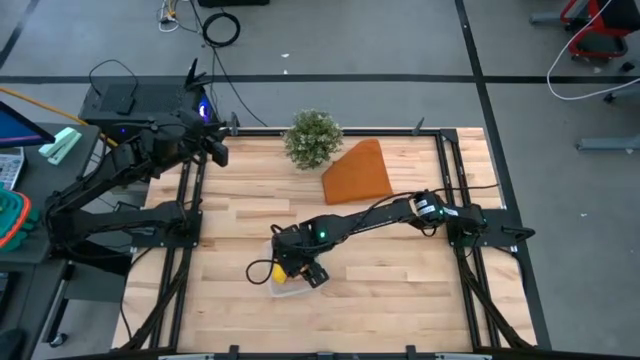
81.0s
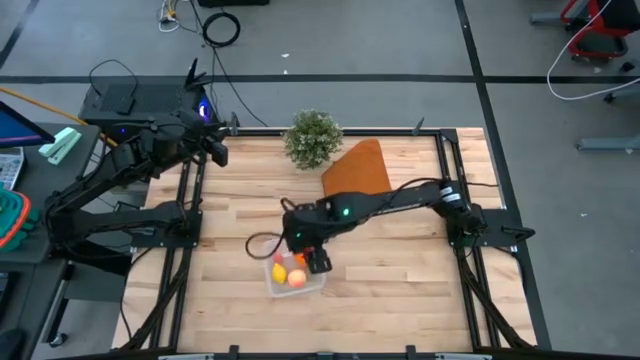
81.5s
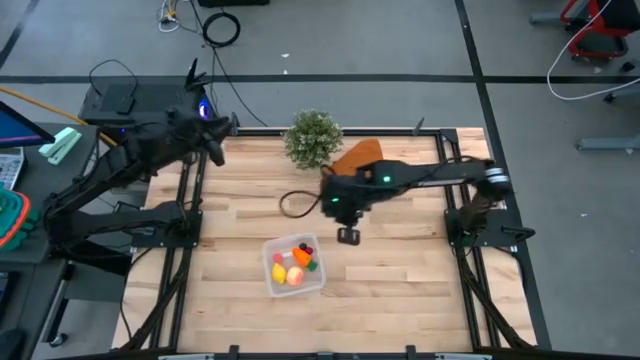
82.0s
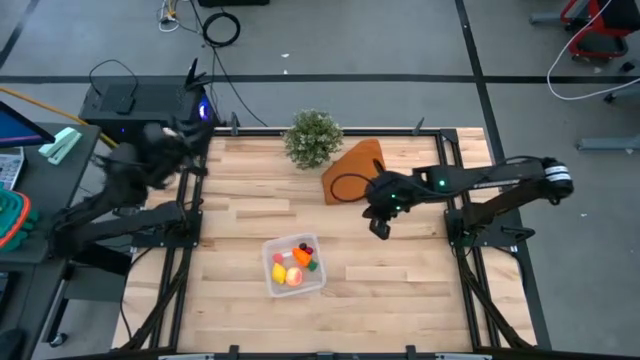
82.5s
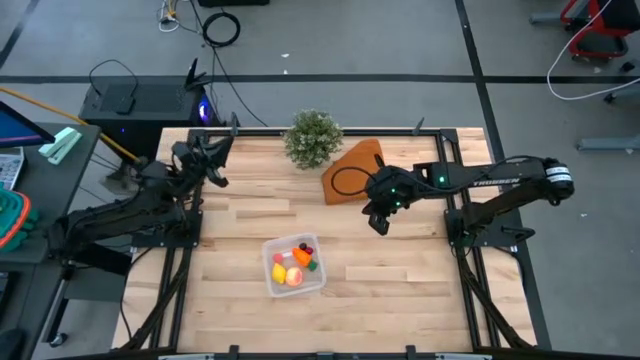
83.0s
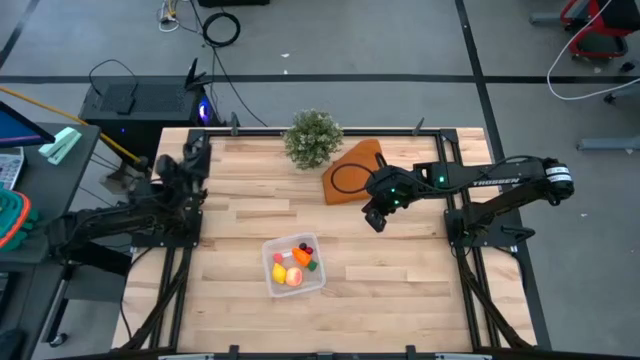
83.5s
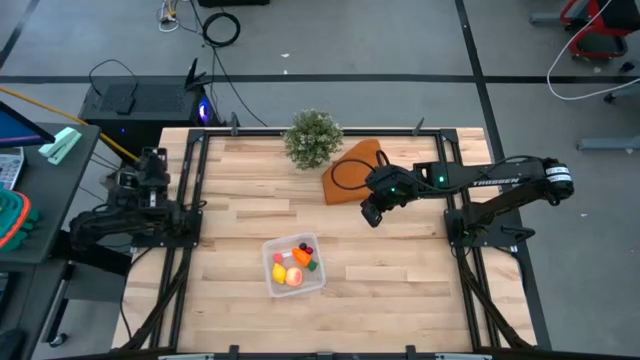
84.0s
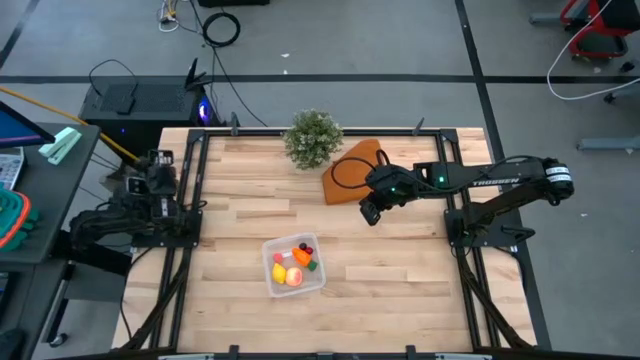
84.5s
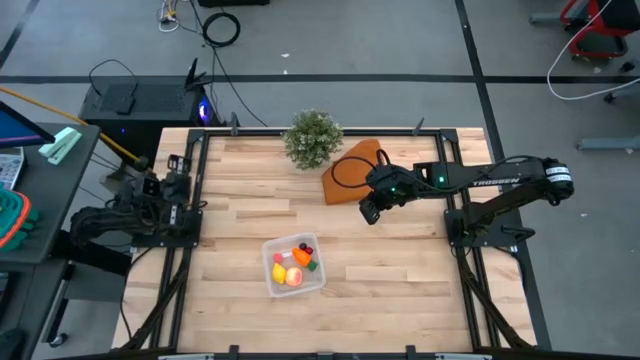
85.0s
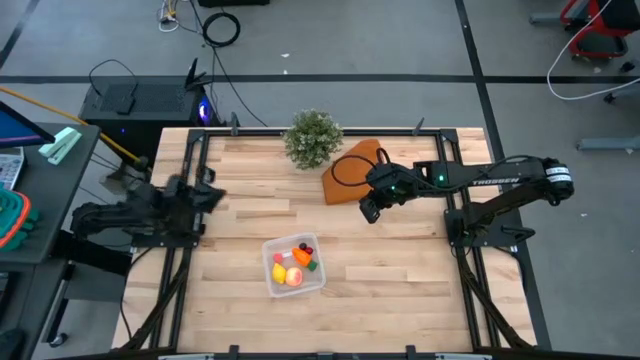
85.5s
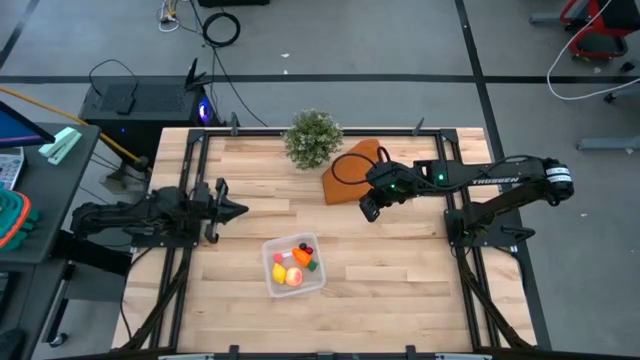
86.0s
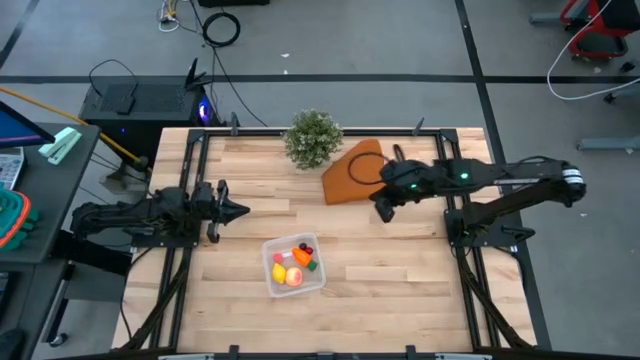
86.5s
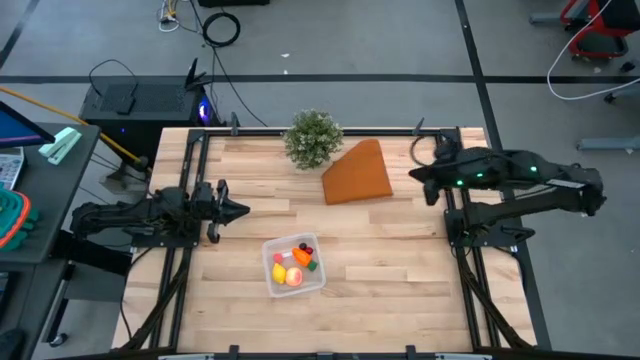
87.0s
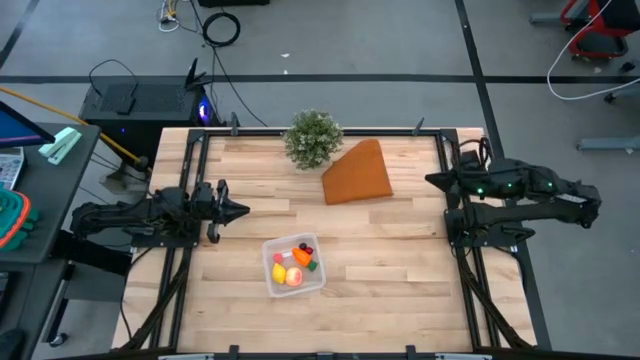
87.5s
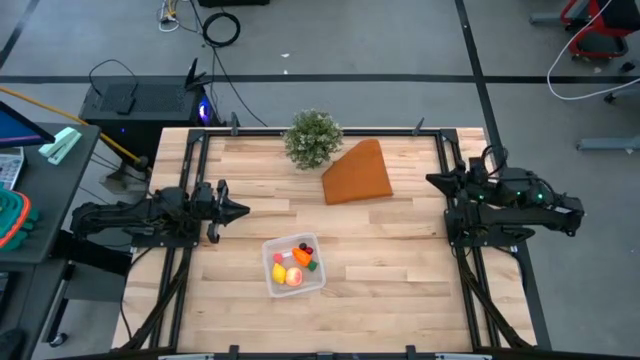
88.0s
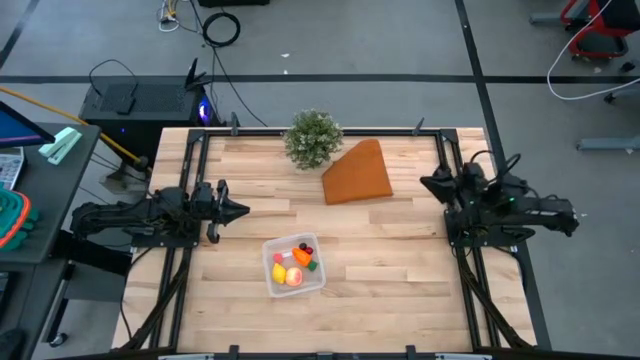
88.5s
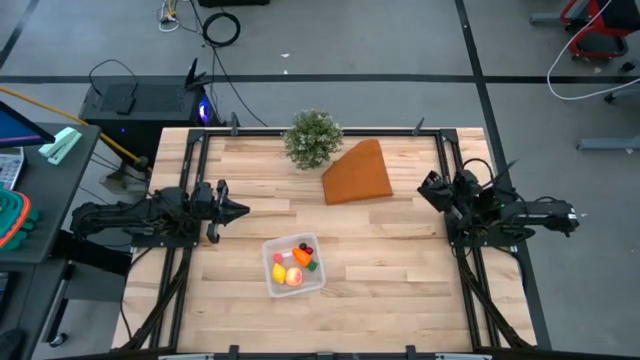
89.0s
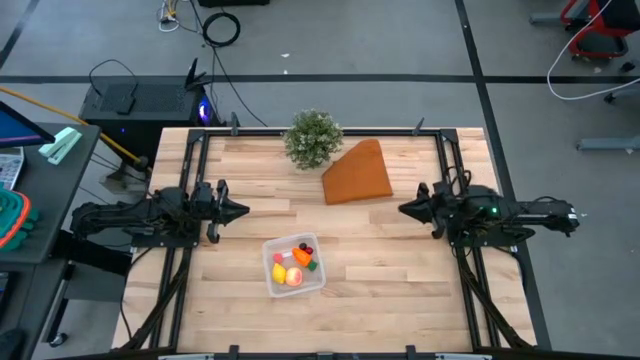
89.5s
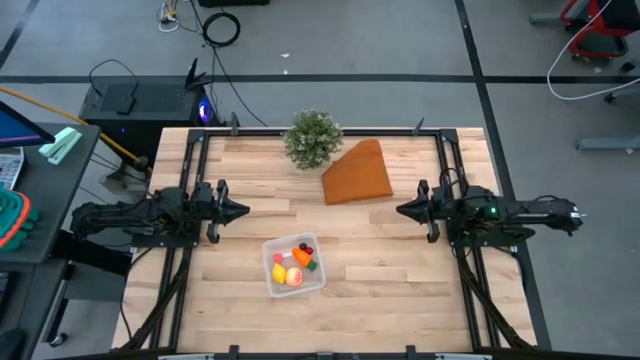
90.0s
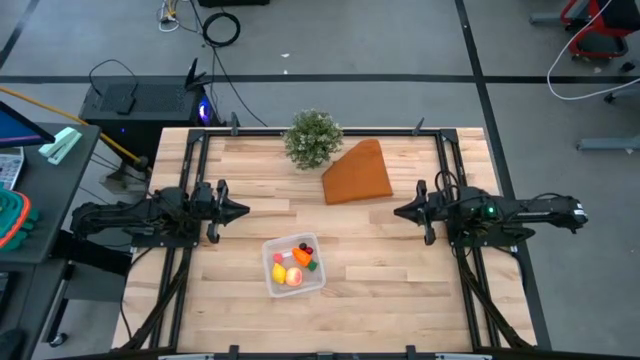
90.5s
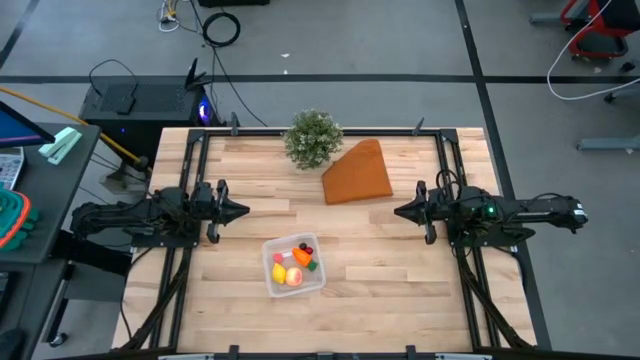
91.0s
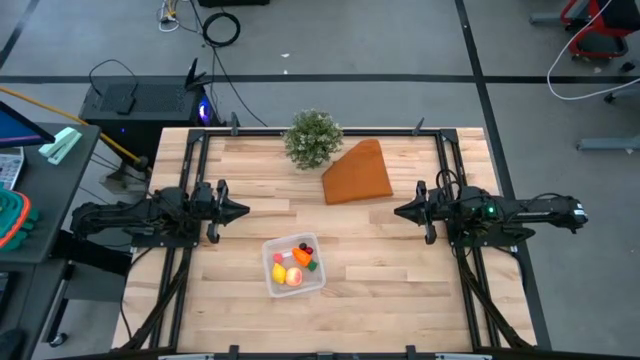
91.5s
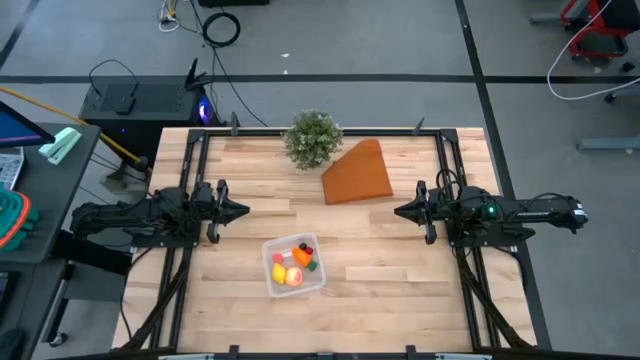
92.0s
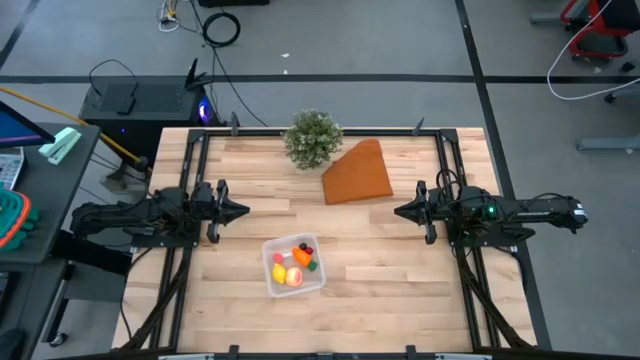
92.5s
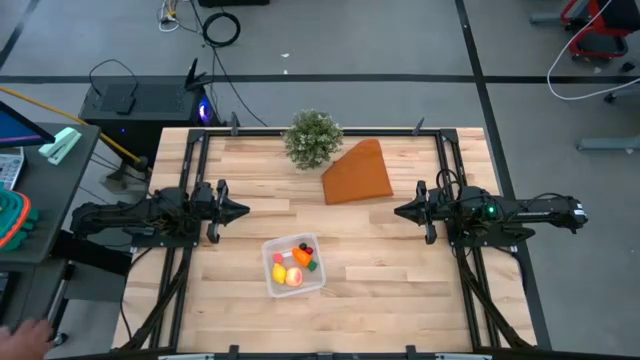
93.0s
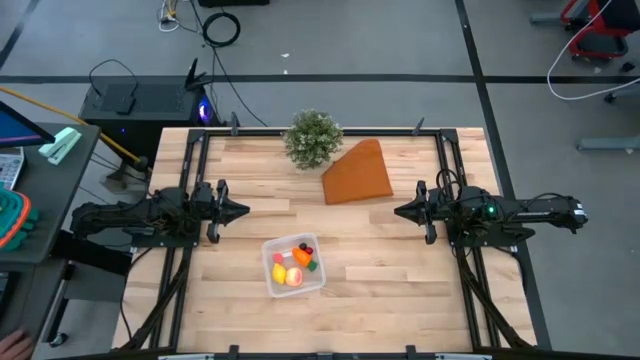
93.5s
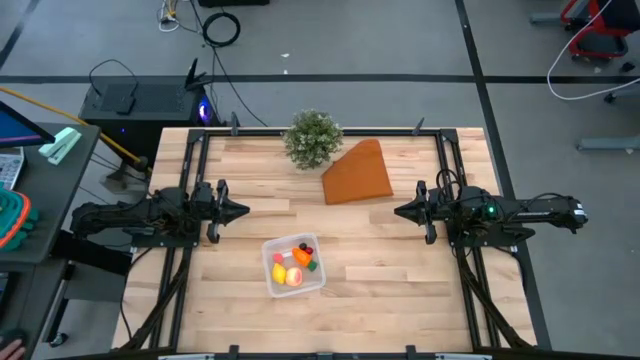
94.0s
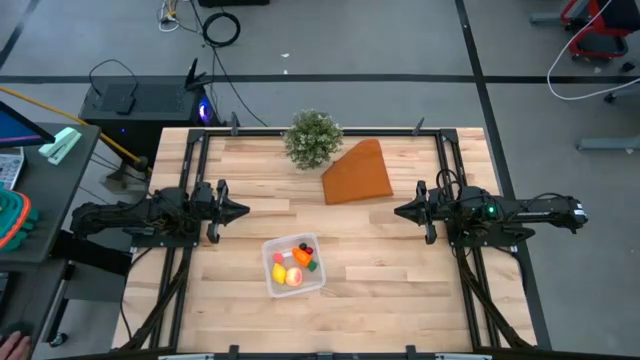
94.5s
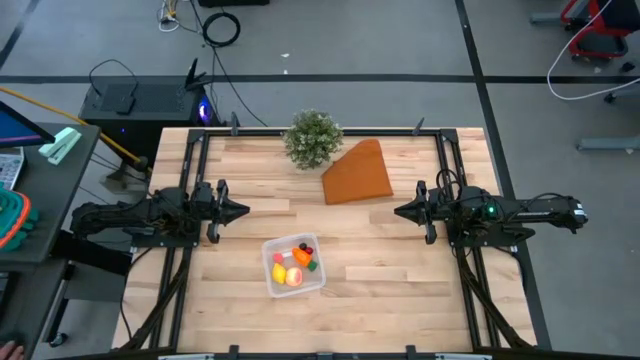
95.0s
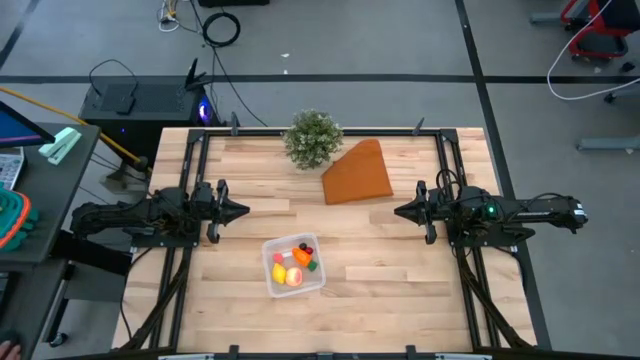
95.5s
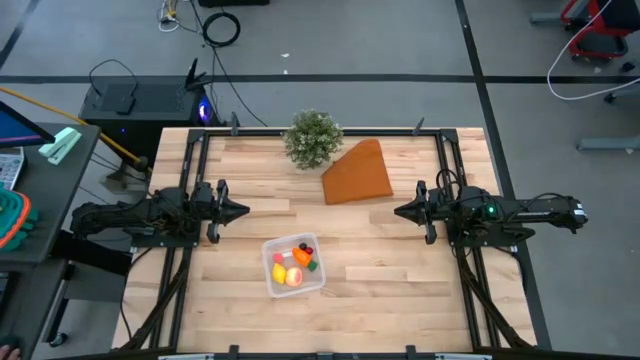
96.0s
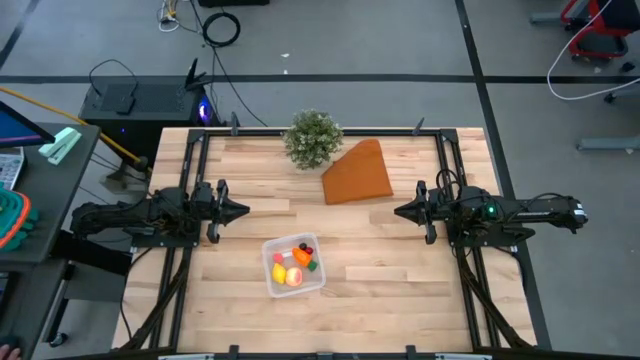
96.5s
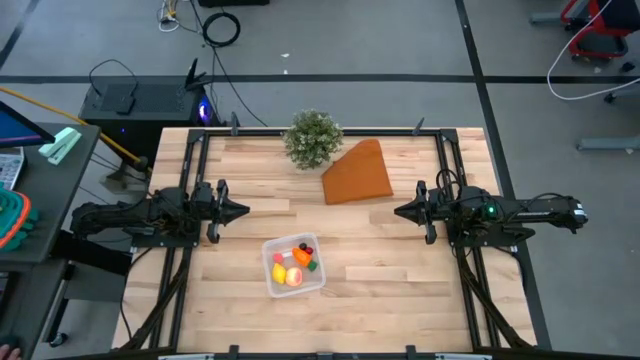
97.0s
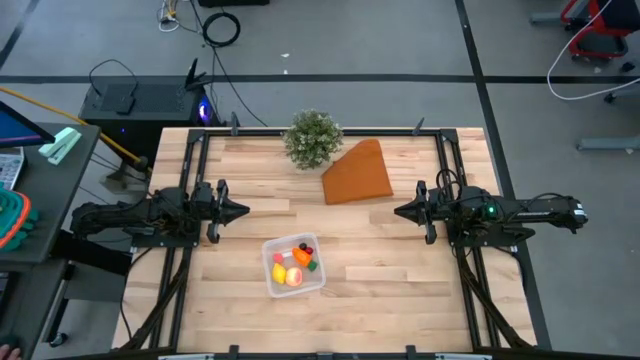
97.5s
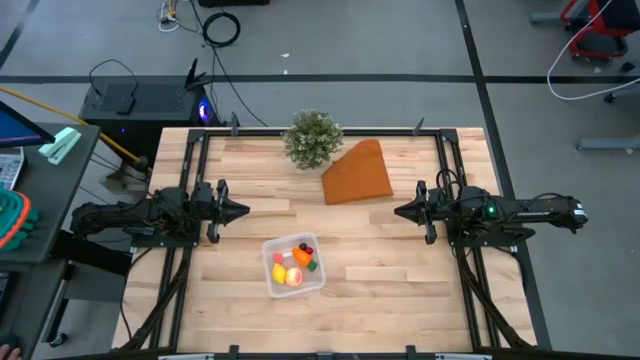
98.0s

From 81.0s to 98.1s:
Task: Pick and placing Produce into tupperware
Return To Home Position

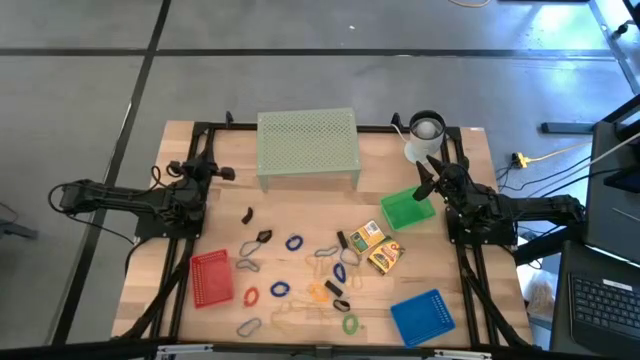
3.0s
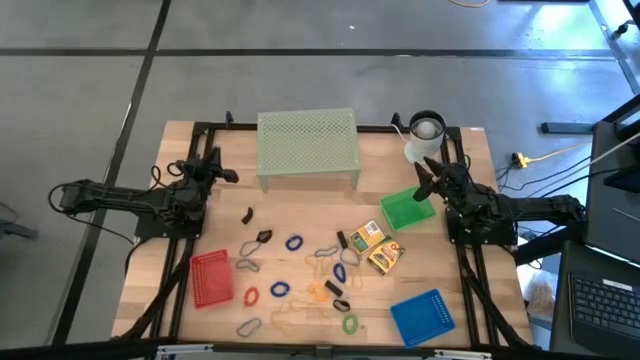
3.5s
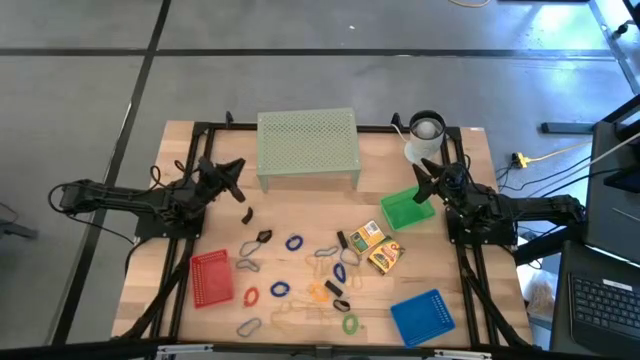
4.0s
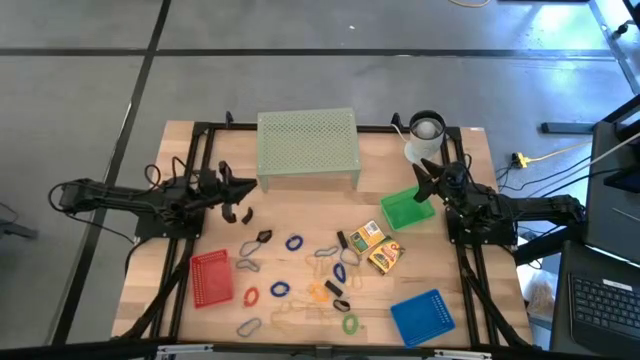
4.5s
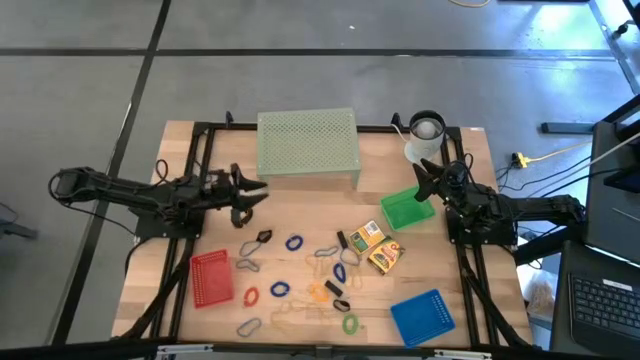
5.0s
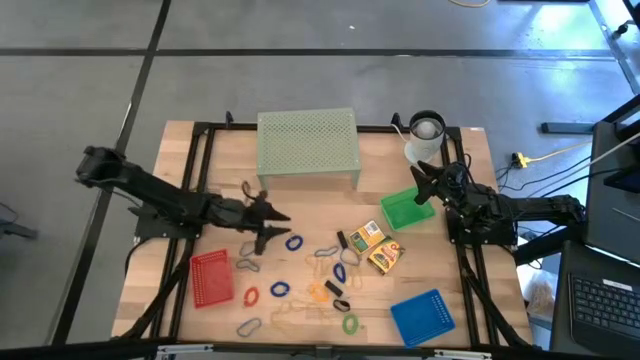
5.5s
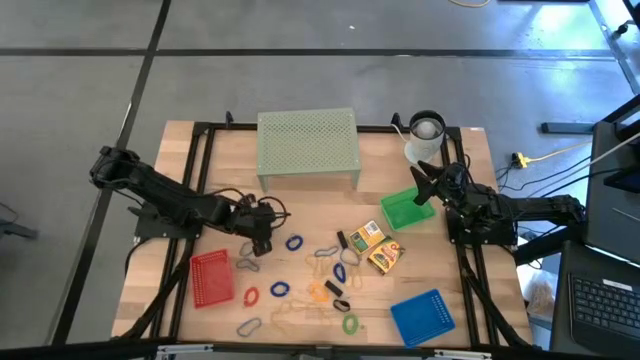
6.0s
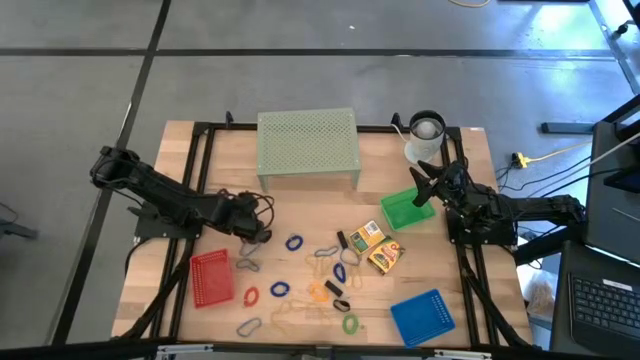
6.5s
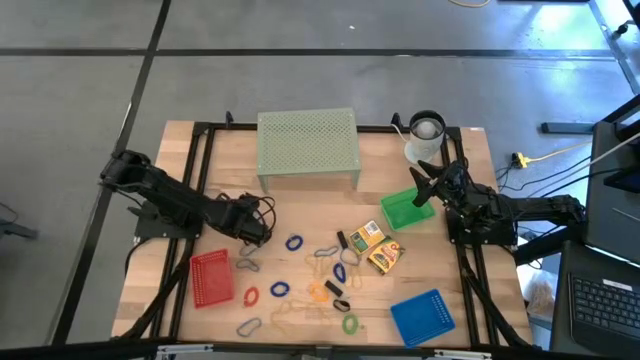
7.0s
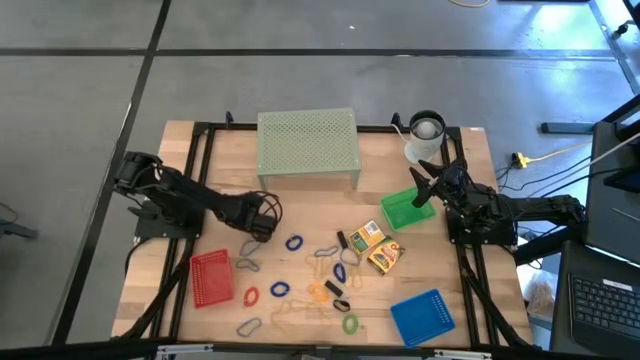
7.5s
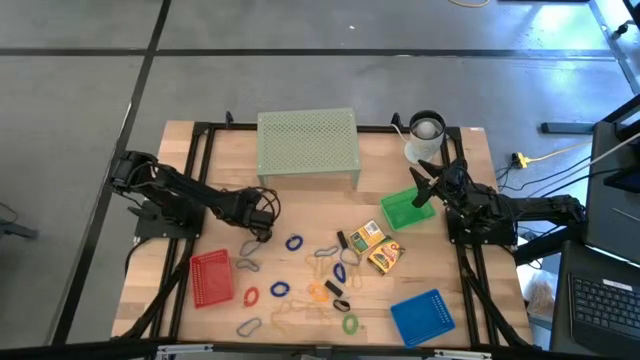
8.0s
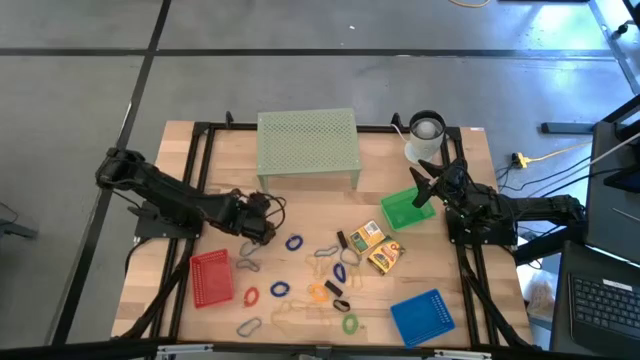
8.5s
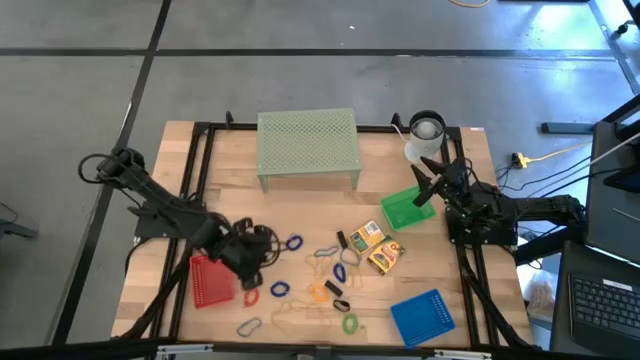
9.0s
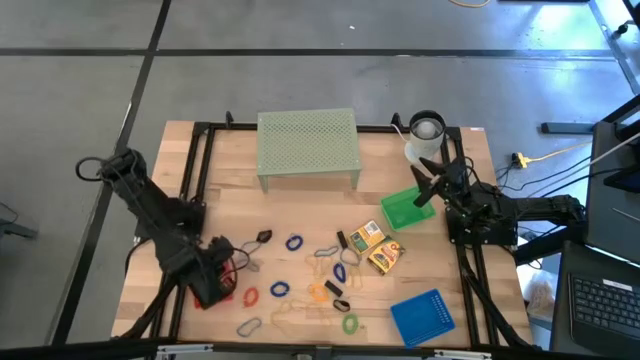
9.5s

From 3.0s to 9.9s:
Task: Pick & Place Office Desk Supplies
Put the black rubber band into the red bin
